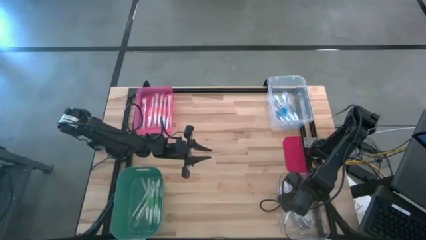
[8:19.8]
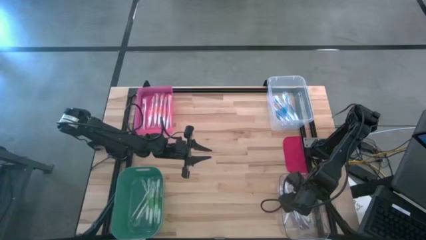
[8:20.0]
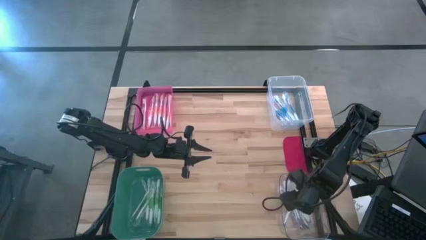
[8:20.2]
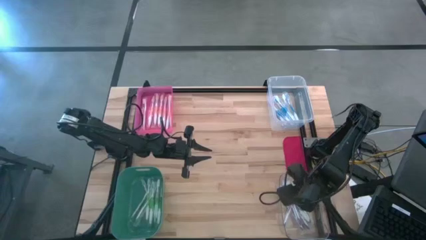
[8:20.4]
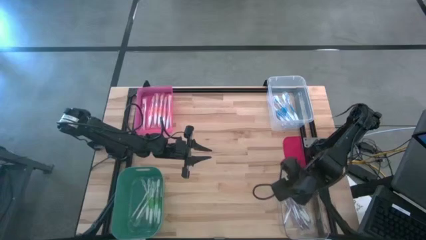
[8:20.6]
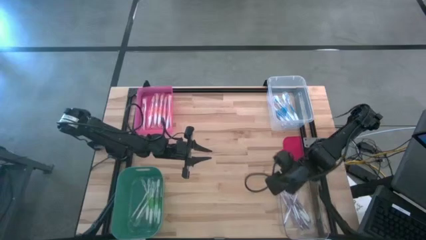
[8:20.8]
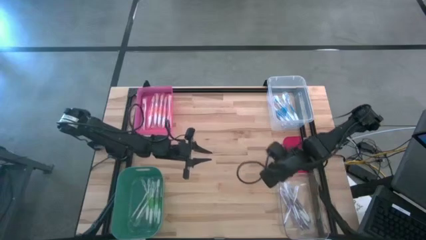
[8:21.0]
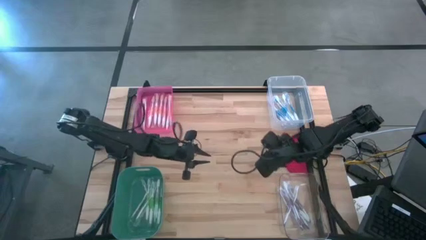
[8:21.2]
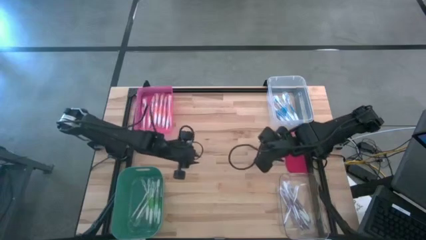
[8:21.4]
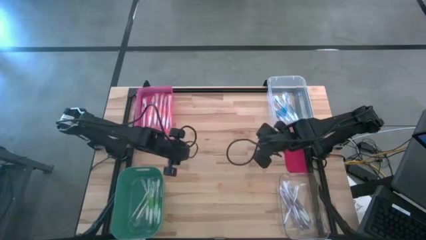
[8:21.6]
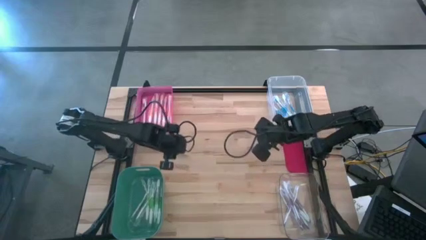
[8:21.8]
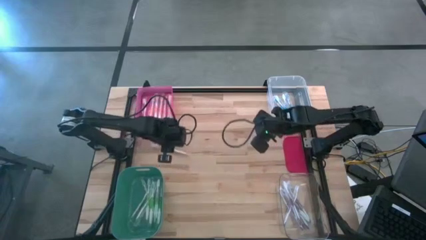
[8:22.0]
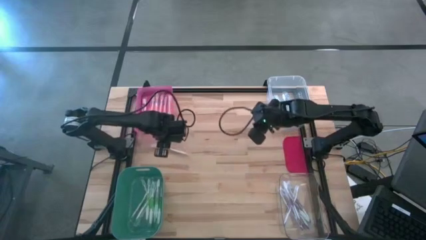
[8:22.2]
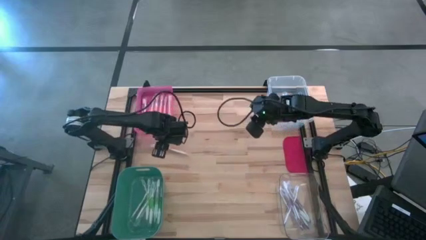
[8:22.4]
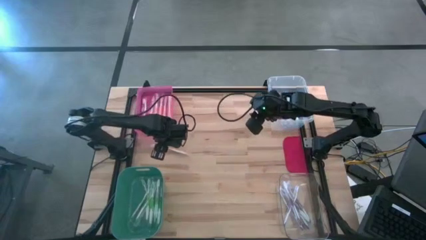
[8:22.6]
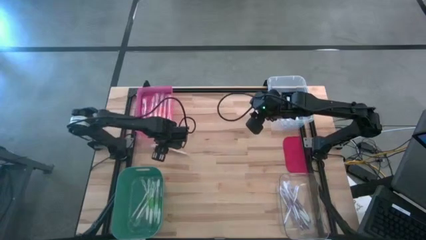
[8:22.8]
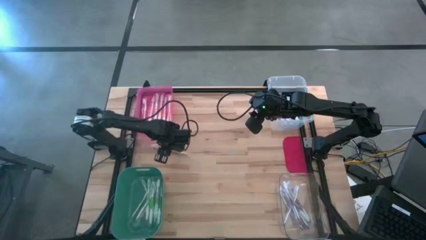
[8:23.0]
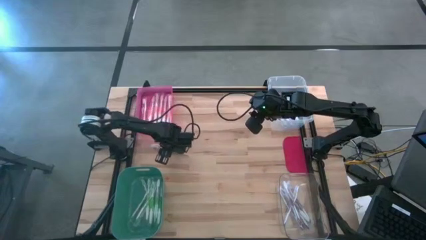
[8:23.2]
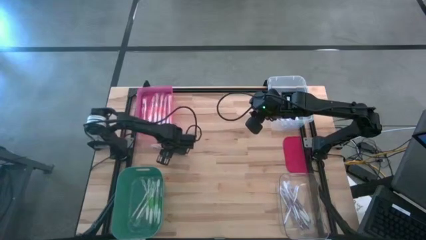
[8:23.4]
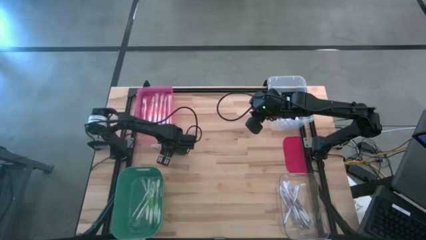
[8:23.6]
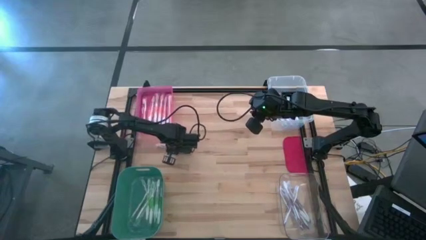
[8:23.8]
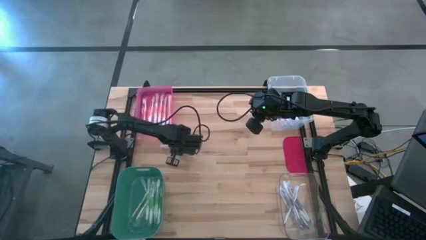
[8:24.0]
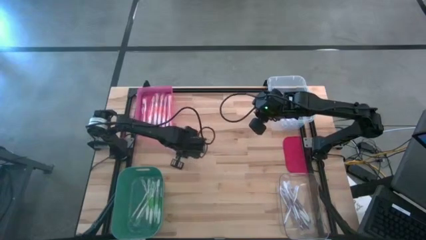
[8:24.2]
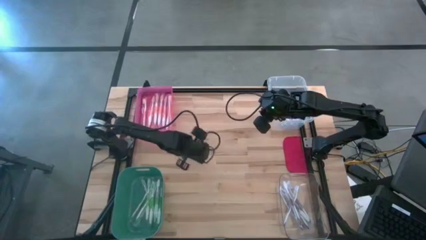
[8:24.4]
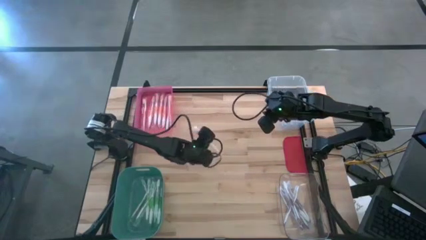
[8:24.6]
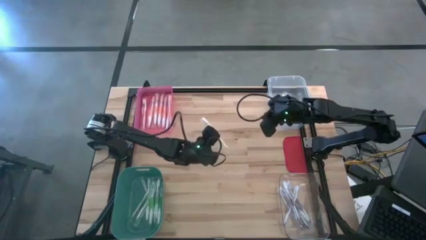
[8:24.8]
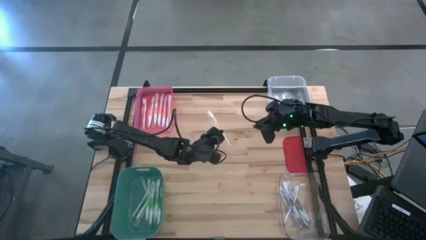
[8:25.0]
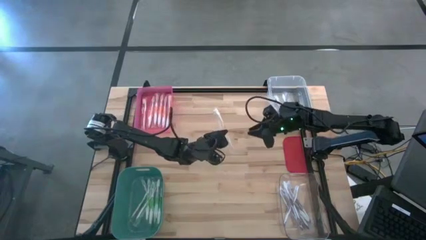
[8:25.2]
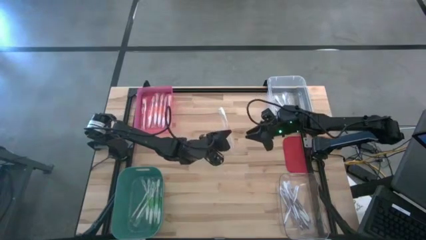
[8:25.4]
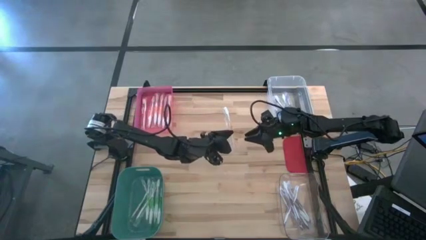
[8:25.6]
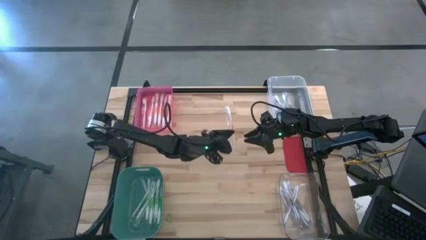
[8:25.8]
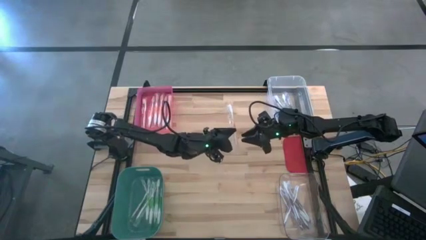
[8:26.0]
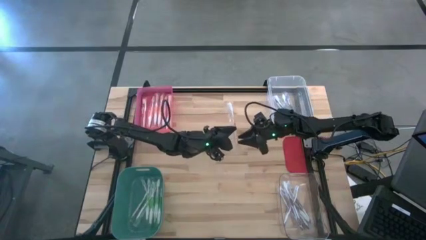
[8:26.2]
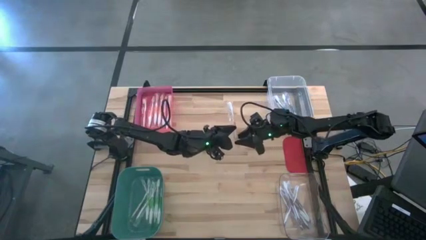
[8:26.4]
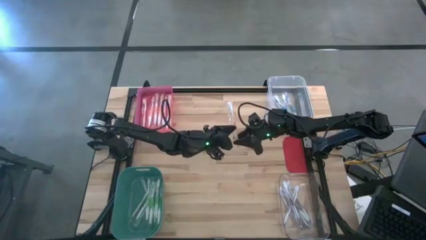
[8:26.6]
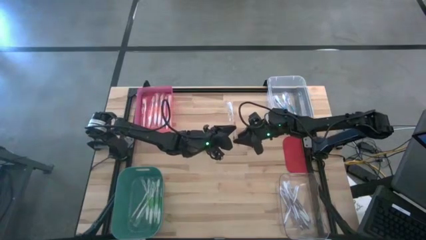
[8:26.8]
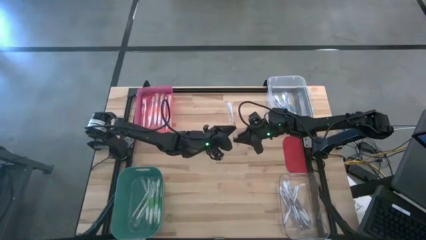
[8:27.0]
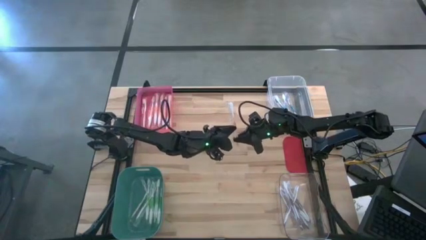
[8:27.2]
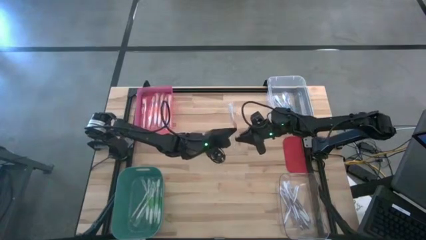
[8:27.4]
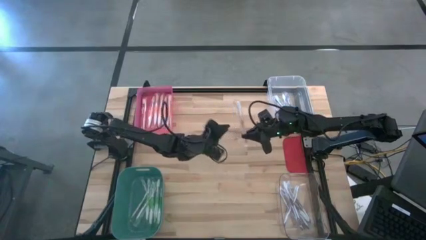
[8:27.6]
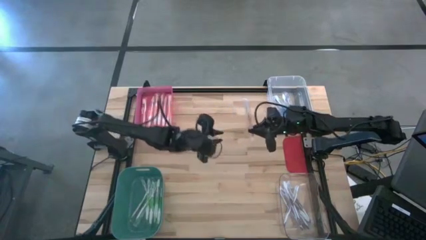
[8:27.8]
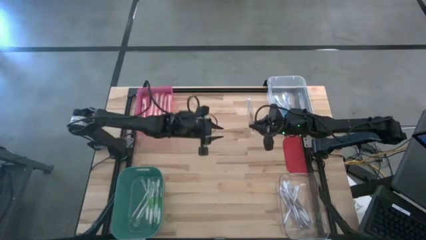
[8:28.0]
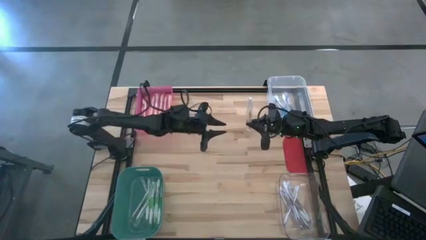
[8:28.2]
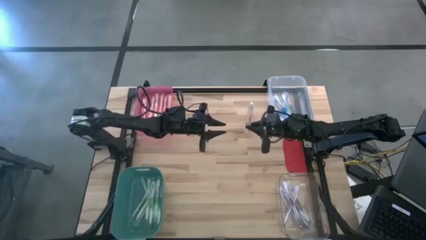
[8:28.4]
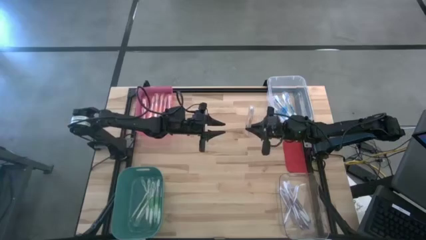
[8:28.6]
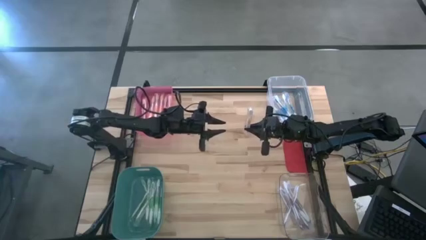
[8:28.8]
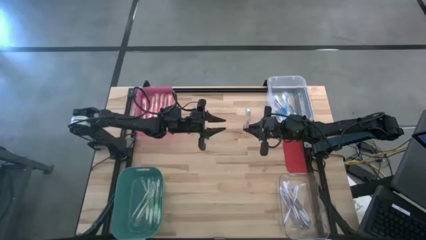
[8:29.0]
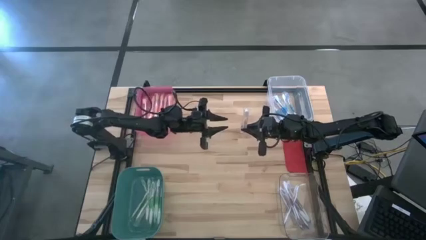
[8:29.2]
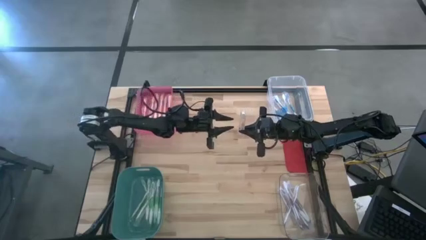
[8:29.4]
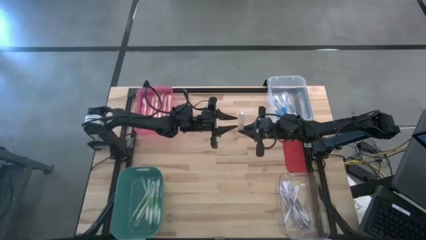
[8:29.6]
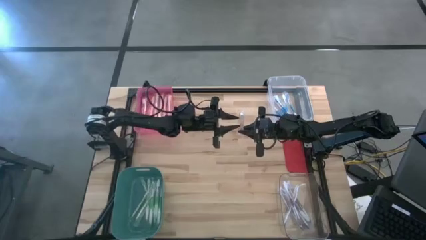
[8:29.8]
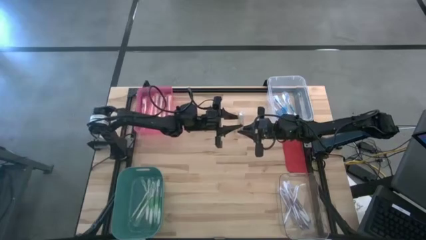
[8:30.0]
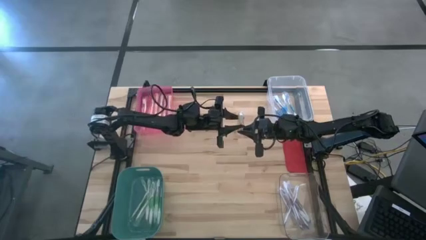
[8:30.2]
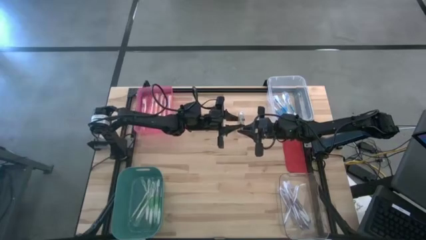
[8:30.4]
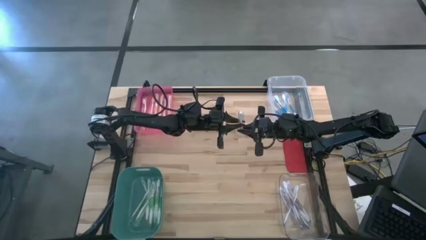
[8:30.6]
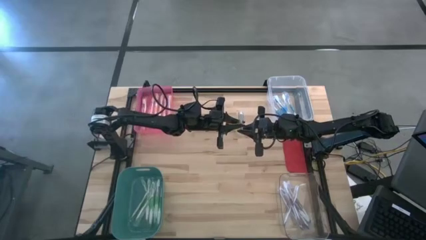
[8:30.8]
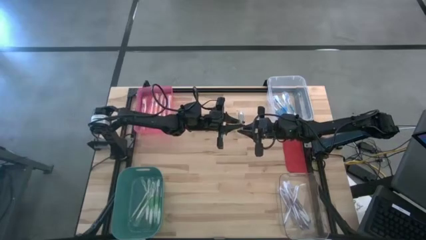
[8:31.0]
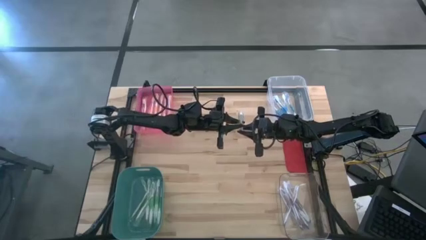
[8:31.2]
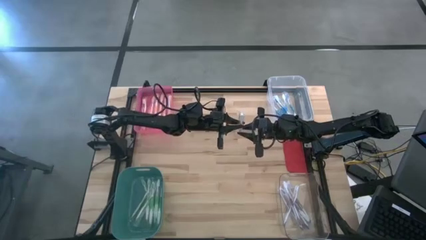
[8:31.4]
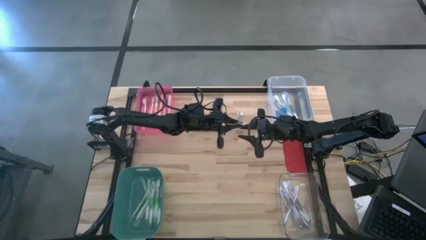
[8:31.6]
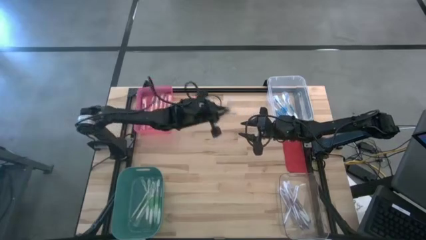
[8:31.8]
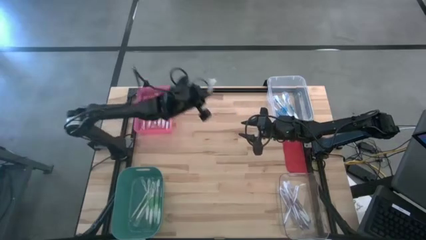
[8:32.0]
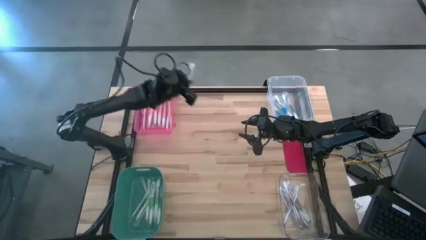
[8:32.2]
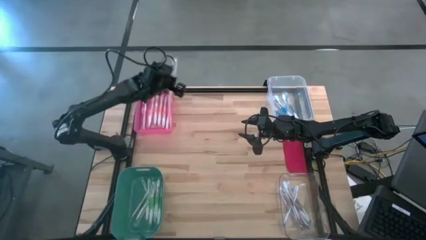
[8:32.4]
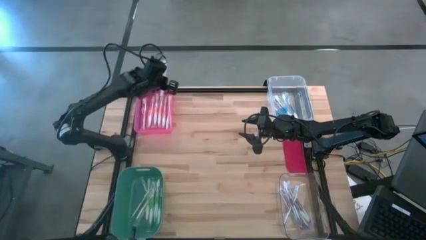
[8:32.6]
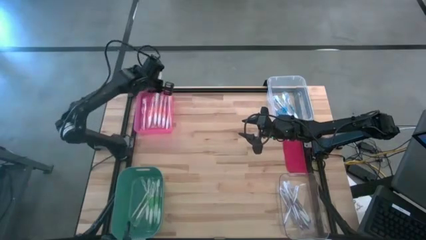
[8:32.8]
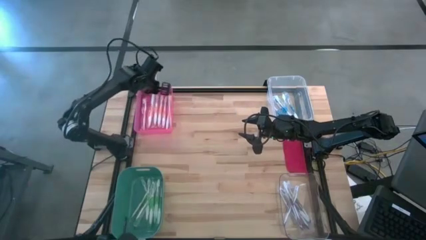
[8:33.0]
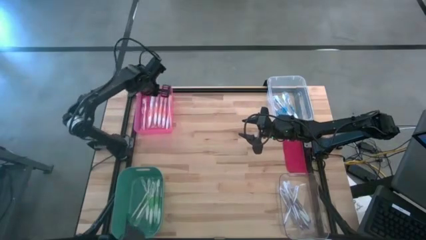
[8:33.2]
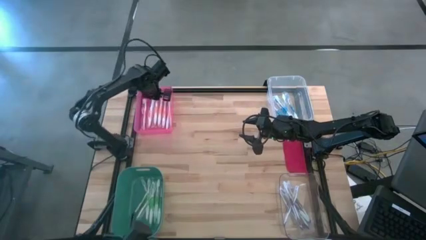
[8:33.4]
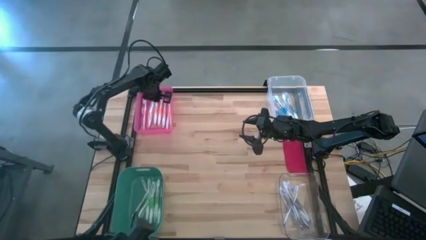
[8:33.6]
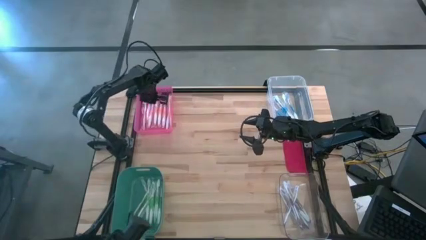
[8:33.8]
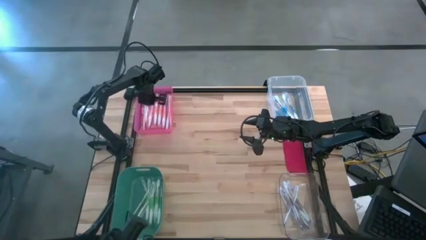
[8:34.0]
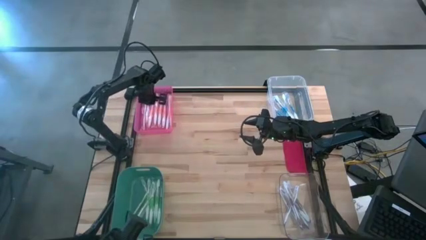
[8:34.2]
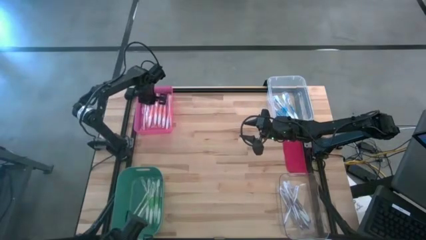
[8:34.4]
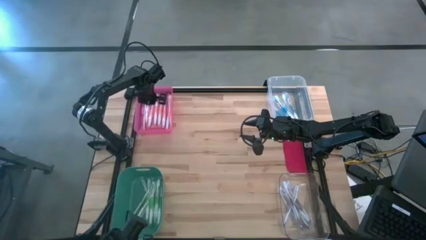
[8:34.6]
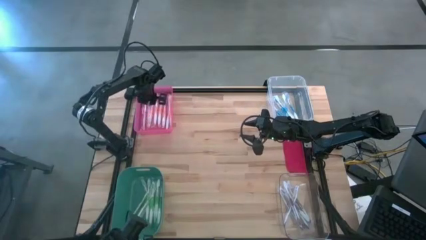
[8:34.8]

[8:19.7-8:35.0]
Task: Pick & Place Toothbrushes
Put the orange toothbrush into the pink bin
